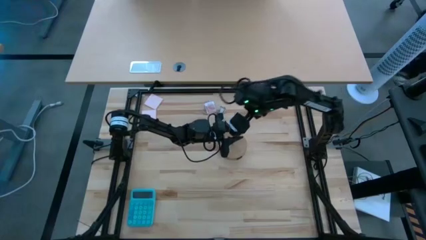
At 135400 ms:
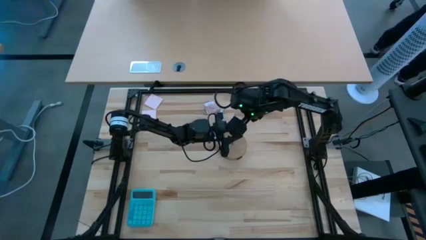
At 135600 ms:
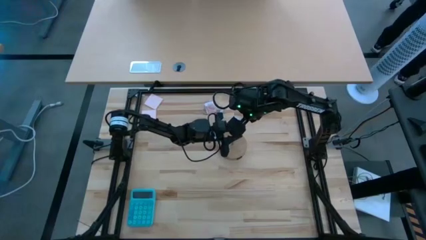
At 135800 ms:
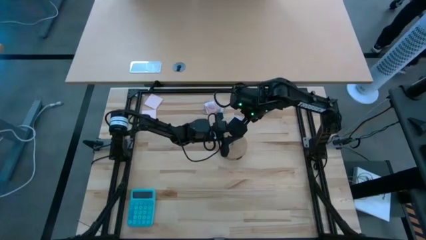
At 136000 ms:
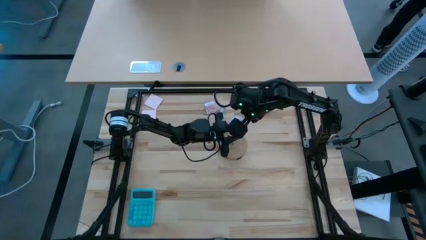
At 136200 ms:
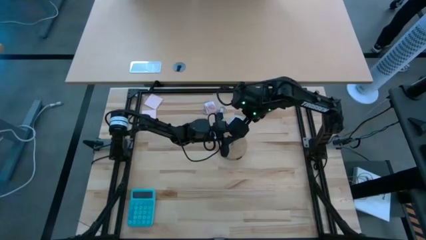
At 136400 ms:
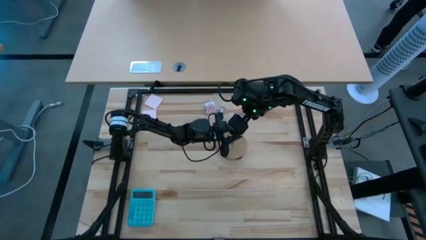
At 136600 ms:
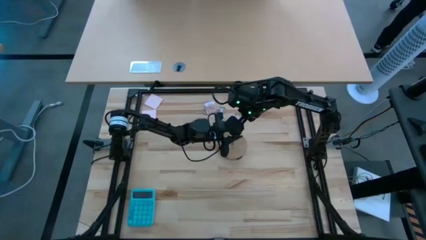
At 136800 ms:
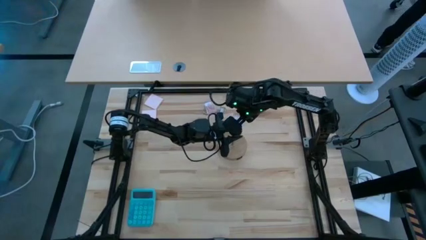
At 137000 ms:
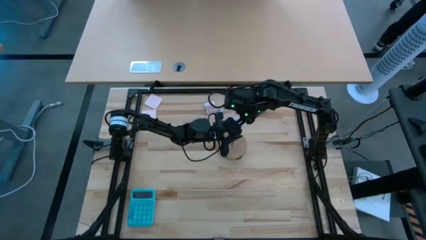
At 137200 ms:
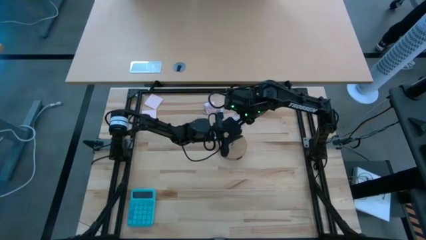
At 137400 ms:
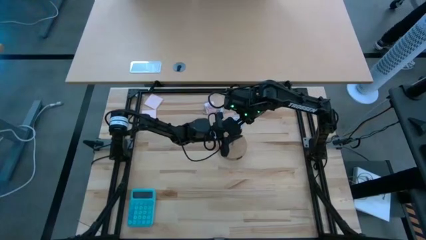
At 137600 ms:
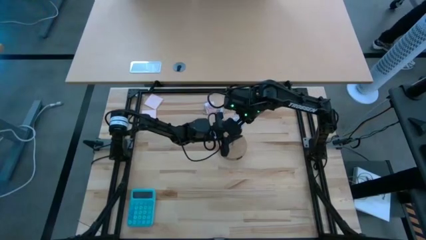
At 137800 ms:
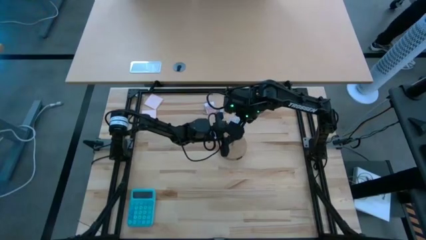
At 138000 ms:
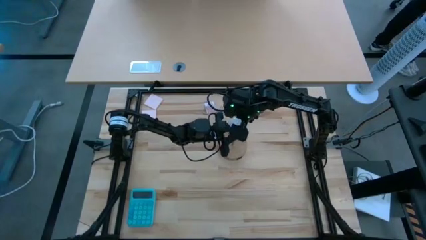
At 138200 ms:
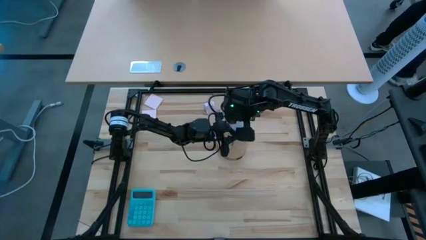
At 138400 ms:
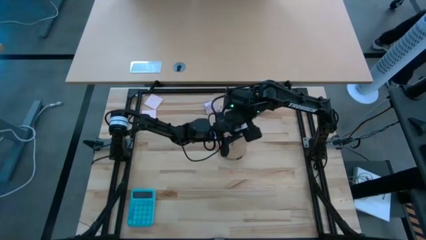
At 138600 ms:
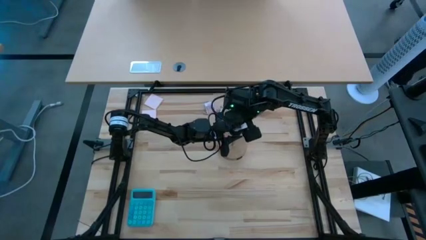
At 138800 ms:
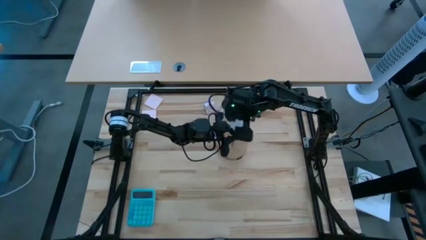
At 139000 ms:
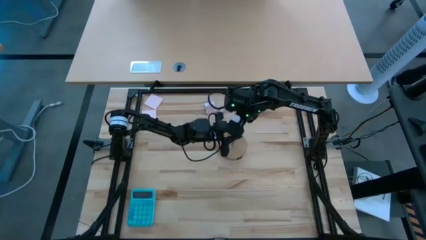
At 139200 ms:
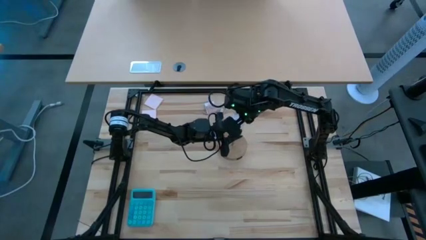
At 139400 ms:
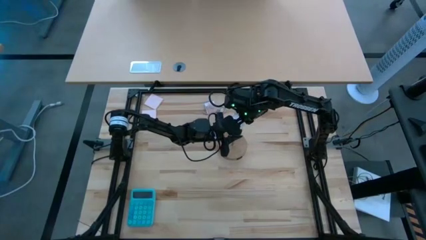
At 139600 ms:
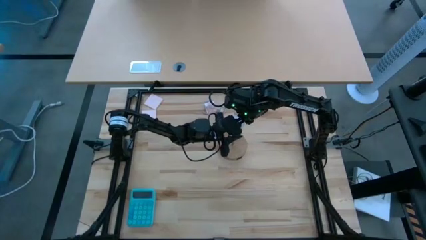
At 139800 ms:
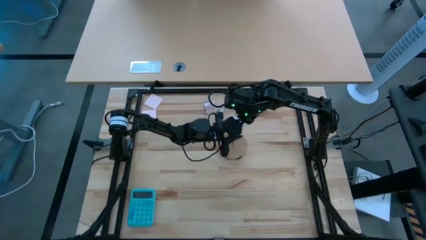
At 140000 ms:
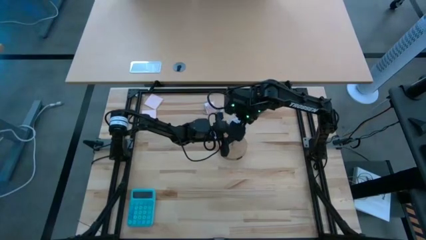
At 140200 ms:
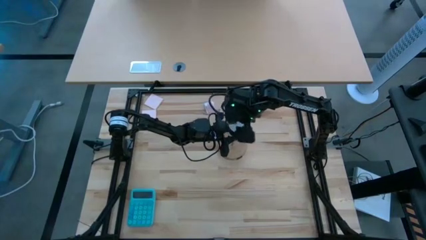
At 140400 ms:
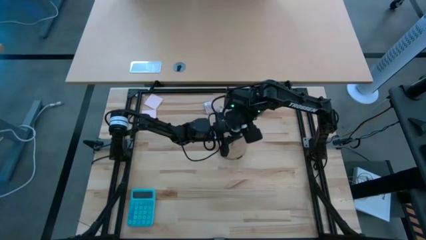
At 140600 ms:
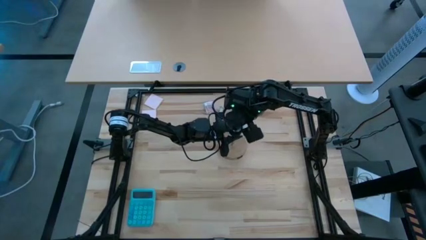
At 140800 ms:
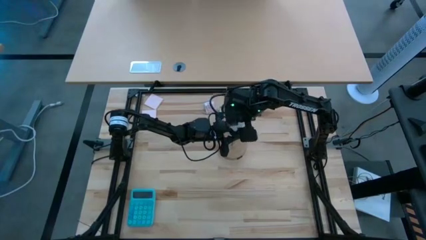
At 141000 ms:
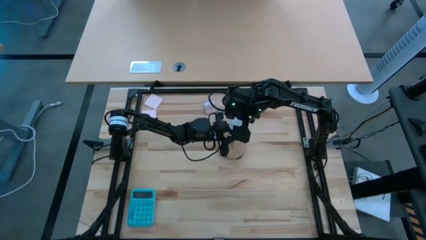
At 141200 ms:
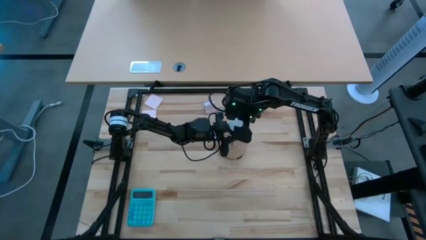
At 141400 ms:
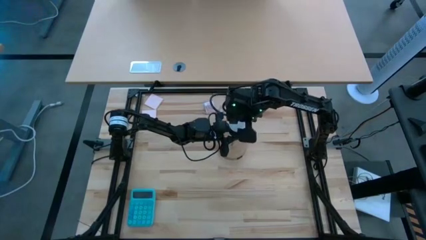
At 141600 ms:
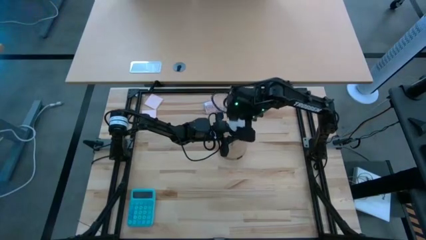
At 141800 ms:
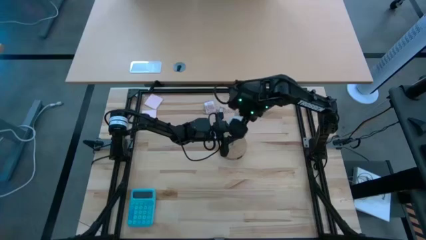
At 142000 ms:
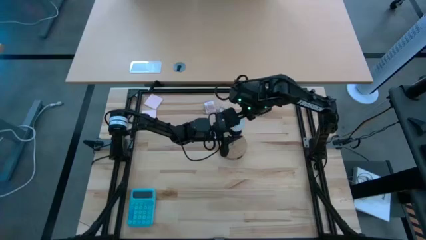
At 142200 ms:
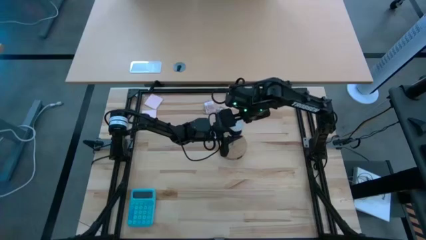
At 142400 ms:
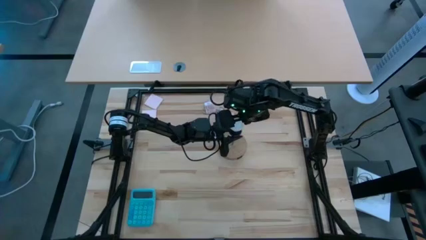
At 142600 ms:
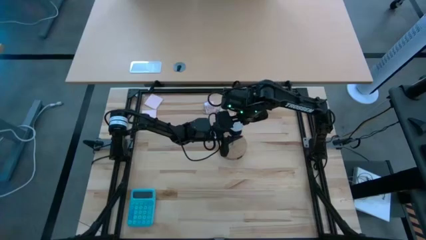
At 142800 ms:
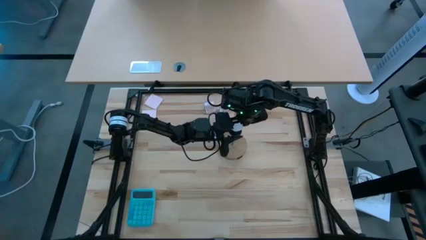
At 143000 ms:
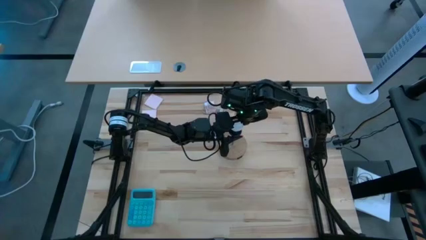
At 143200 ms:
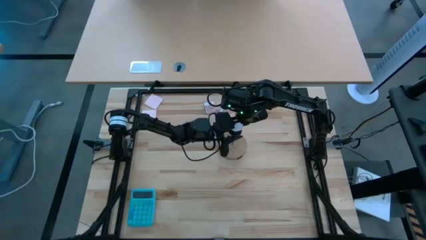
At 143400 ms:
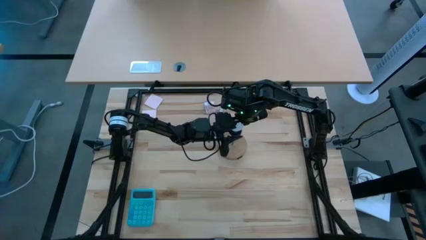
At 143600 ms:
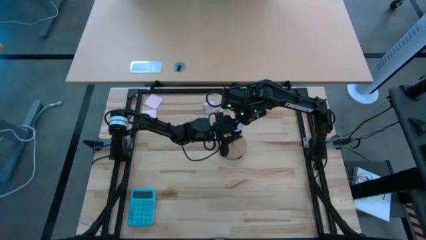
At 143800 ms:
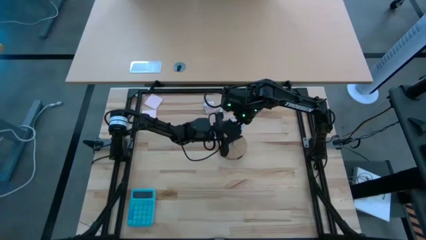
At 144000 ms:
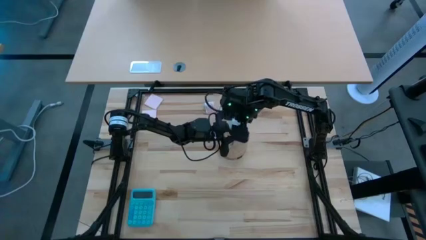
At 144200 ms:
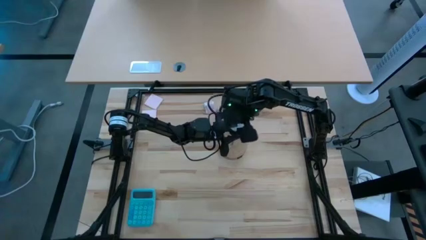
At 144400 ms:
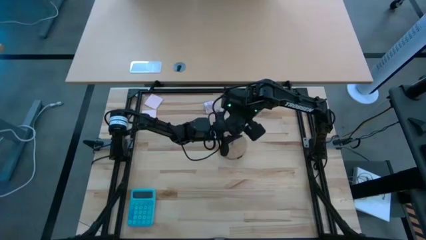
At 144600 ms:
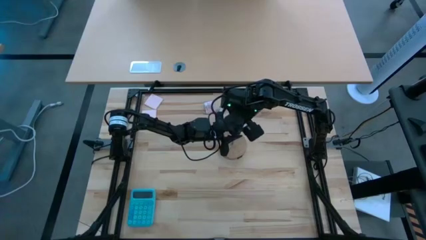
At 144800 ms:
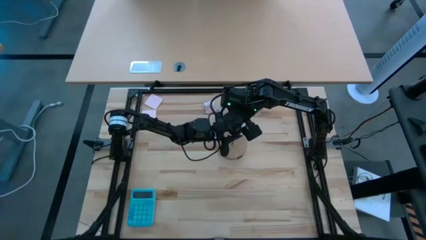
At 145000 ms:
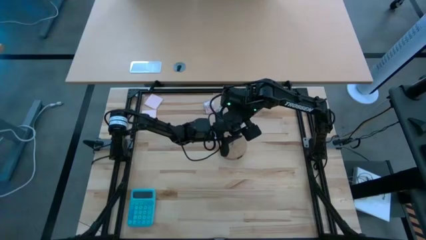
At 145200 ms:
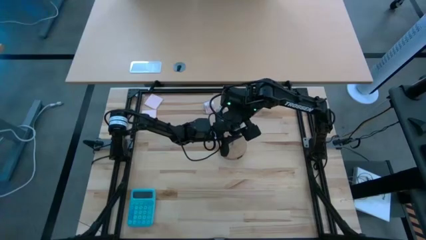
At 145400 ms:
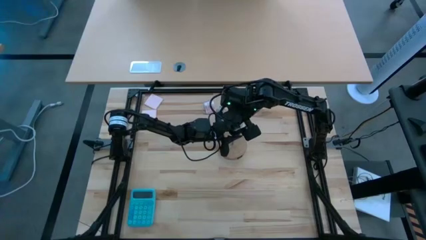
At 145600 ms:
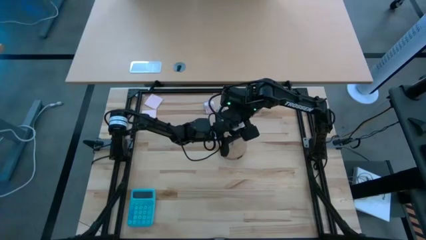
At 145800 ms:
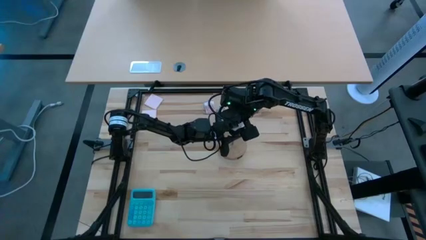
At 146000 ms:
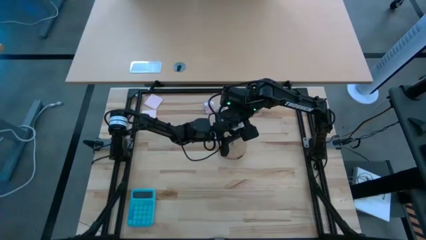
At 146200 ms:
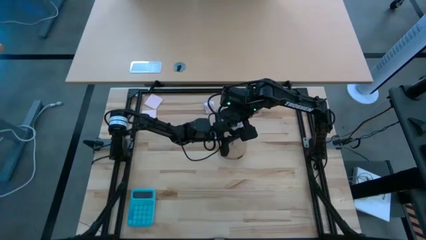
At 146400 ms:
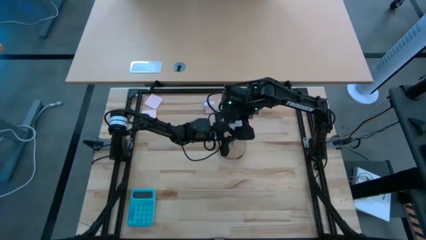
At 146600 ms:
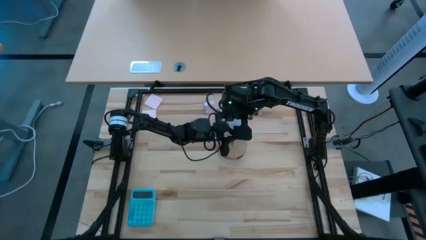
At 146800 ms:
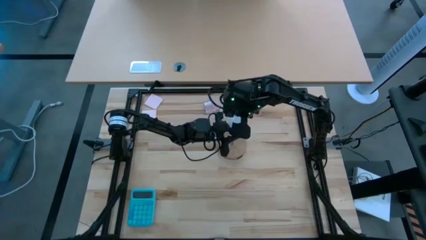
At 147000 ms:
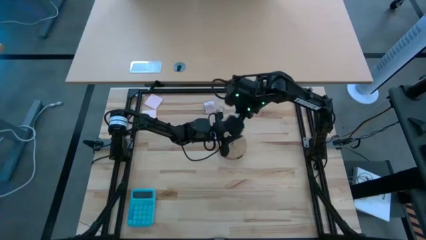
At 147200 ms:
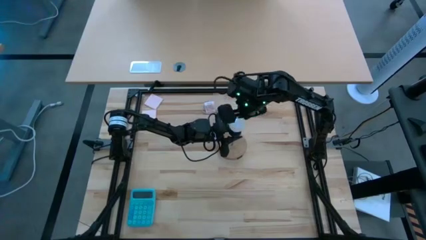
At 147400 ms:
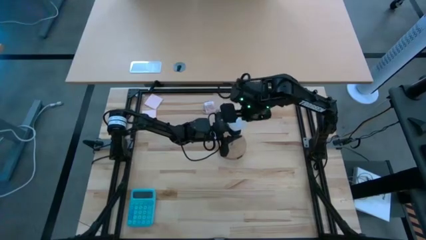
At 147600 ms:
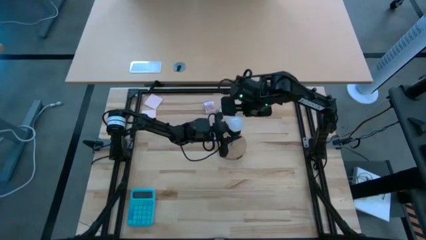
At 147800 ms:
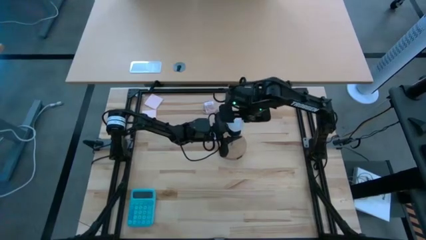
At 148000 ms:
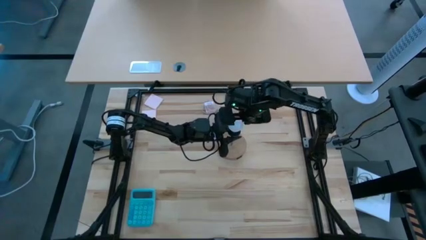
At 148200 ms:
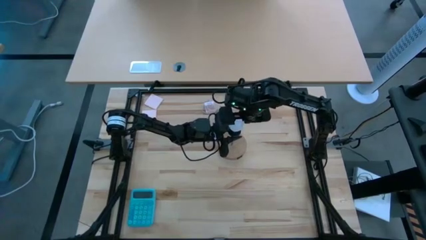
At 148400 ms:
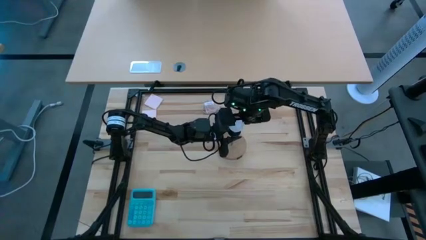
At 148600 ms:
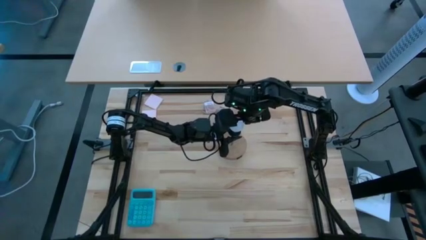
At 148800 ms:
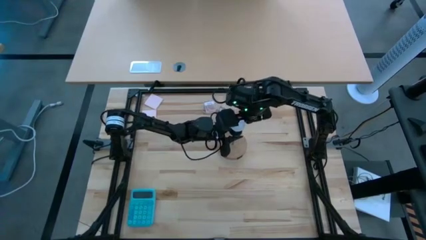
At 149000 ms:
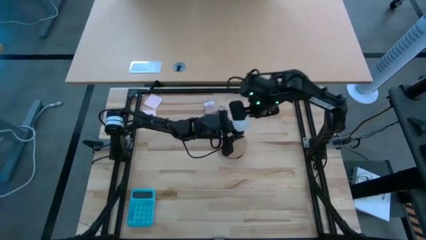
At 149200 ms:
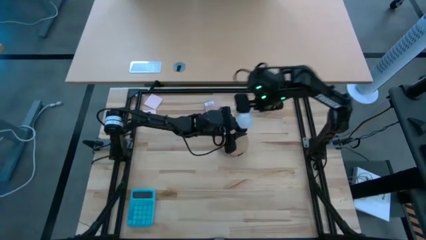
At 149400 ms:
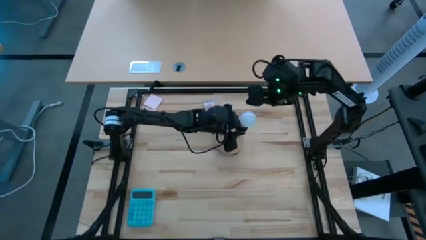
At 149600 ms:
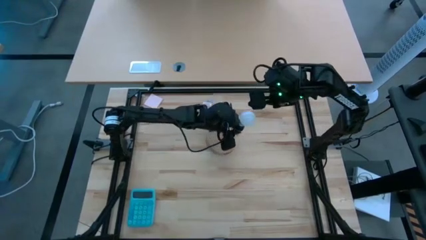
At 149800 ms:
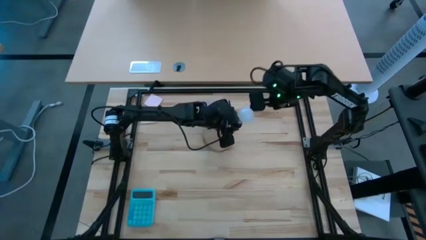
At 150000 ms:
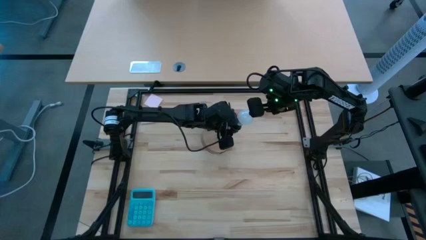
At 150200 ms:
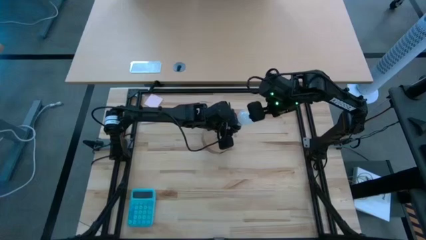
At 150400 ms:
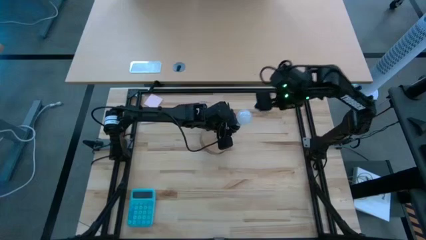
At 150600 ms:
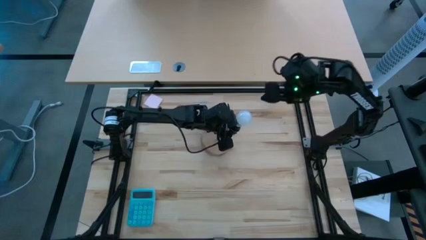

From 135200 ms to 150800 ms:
Task: Screw lightbulb
Remove the light bulb from the lamp
